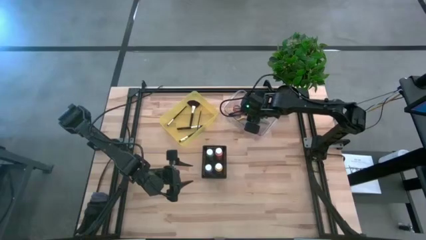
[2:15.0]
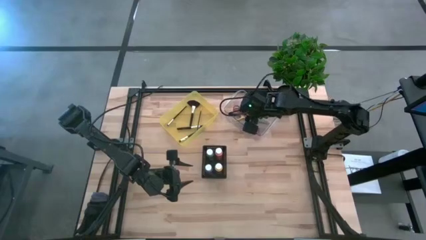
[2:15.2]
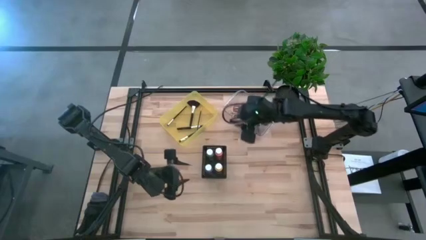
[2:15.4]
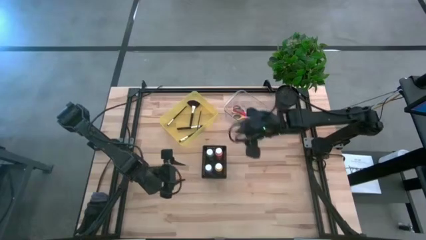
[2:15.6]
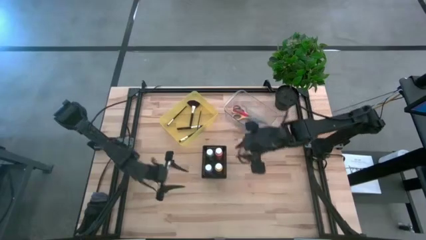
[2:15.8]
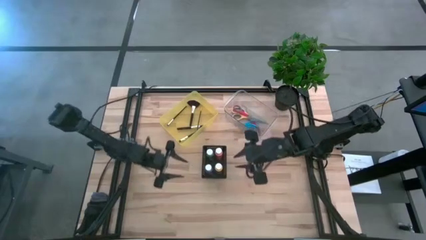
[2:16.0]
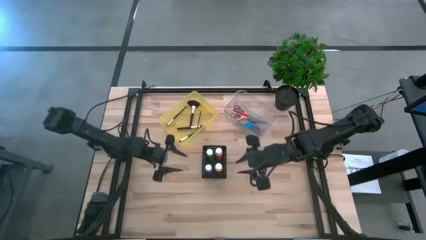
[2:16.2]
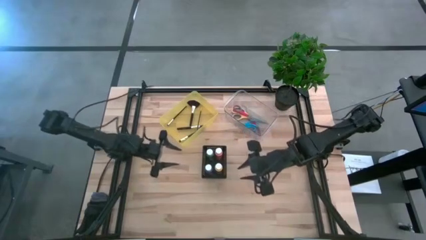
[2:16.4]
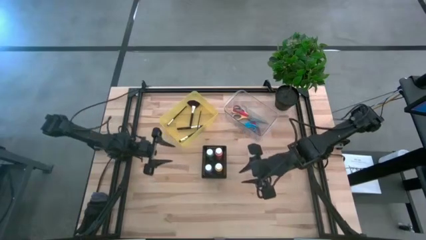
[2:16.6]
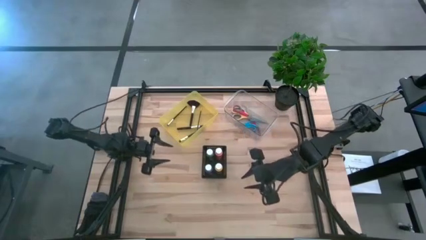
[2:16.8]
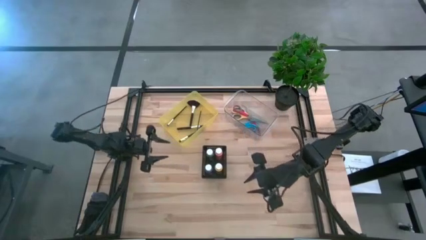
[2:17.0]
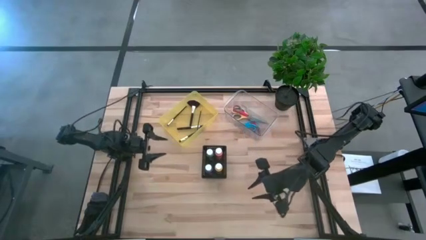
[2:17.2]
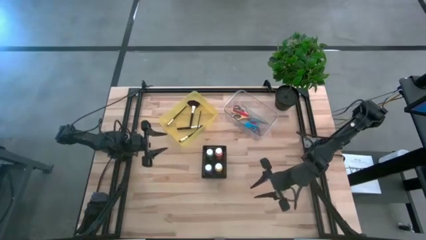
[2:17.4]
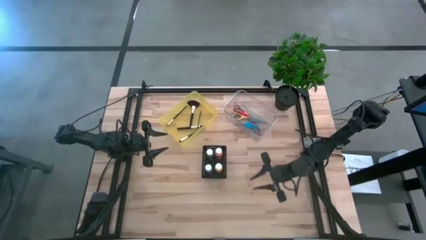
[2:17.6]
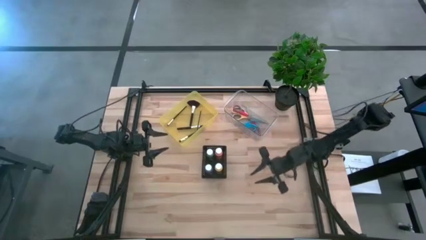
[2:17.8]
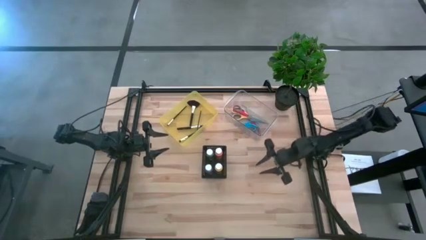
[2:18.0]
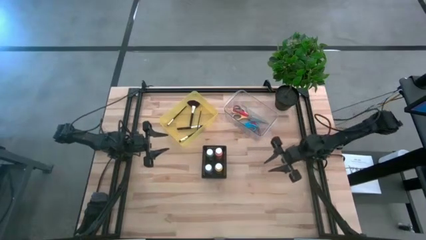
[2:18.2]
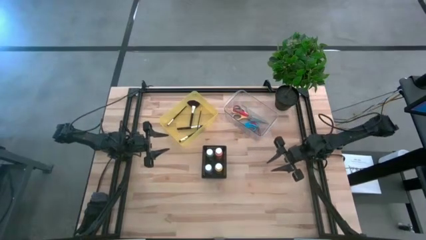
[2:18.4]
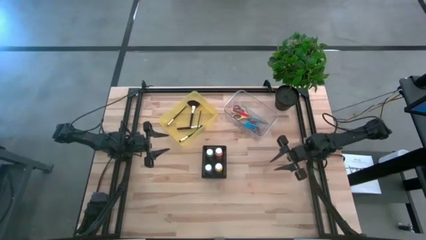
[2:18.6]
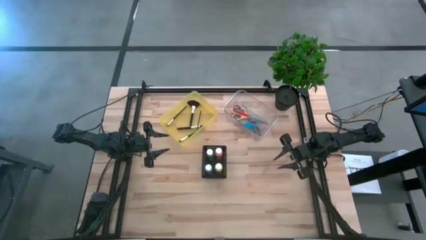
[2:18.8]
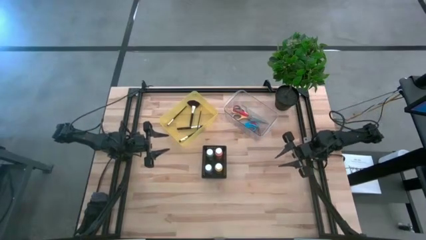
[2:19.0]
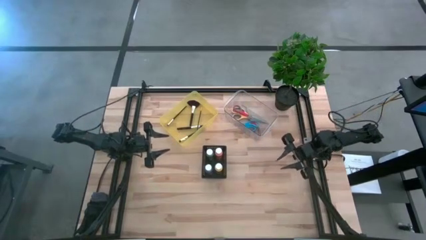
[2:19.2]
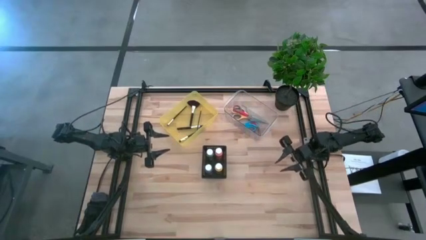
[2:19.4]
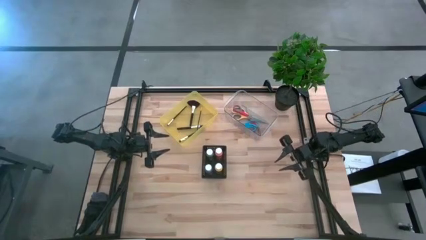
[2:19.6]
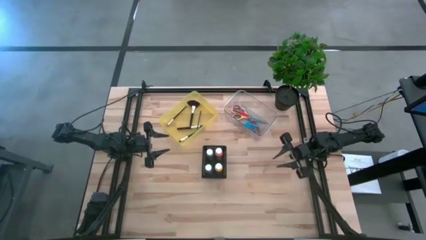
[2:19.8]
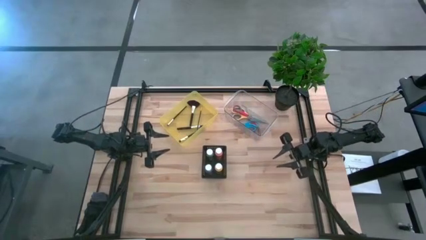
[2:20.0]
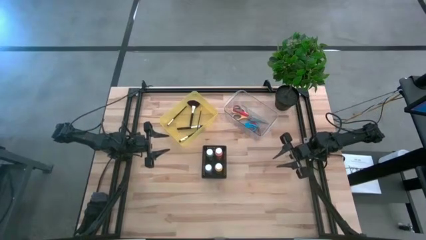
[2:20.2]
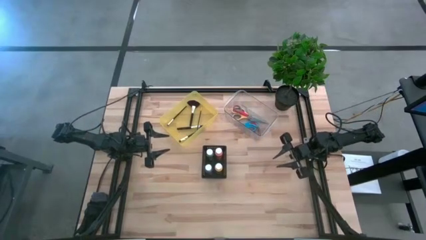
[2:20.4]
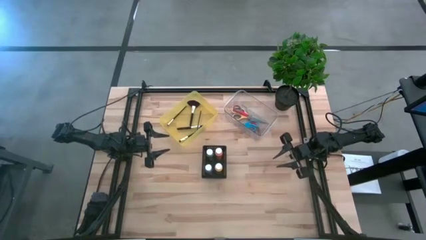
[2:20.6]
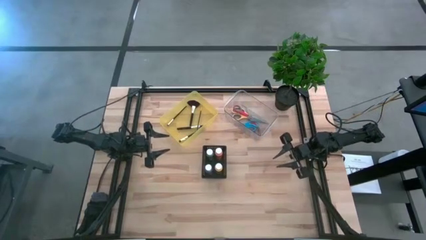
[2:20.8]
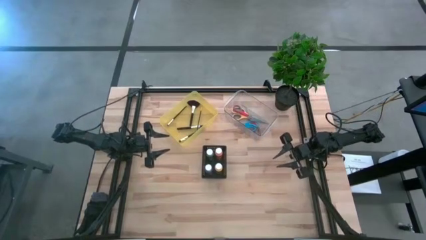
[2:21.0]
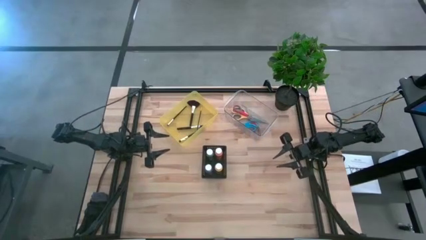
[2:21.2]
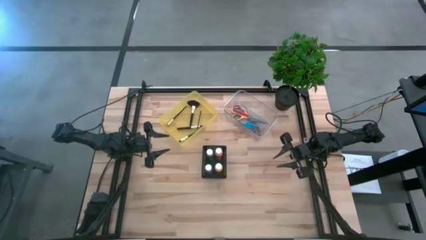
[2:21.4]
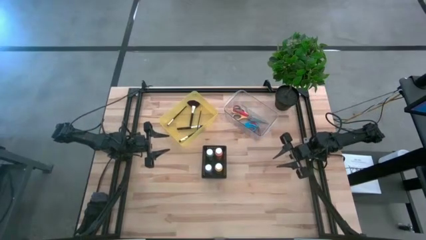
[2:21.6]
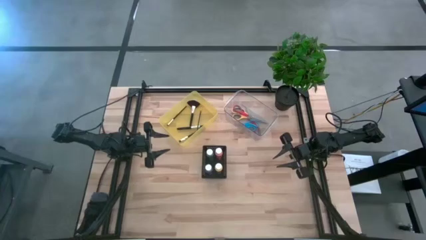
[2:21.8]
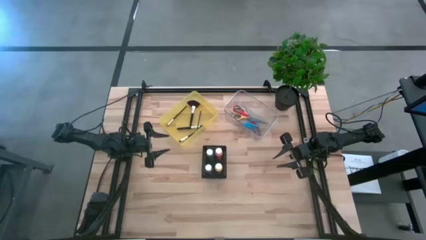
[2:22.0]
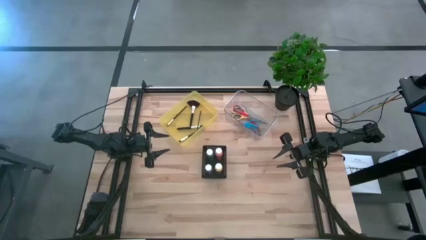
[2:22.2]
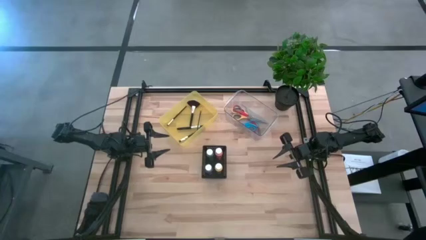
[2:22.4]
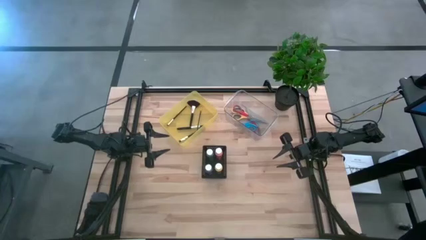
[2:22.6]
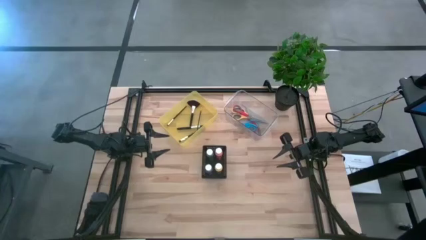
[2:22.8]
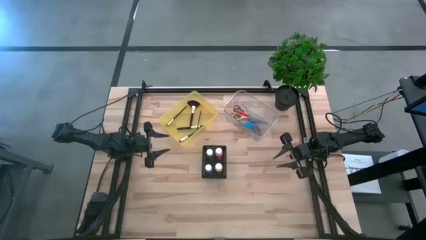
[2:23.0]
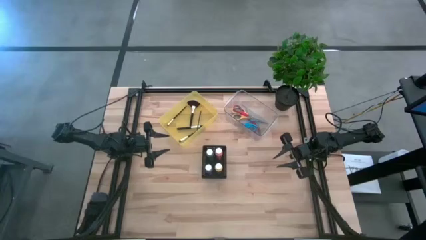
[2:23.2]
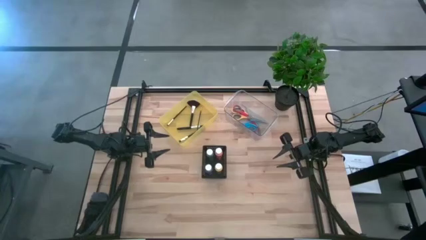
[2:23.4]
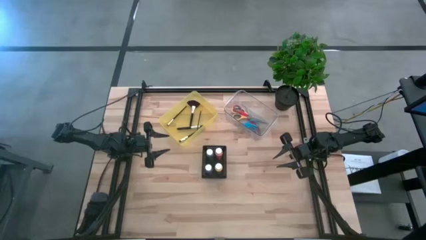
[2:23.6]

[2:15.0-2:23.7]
Task: Pick & Place Paint Supplies
Return to Home Position
